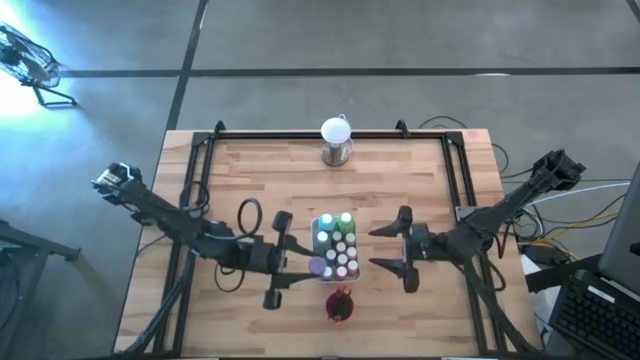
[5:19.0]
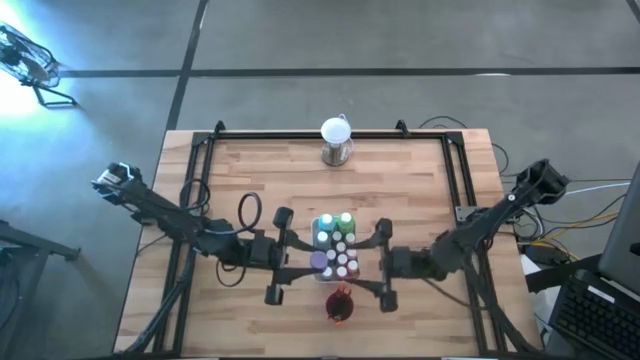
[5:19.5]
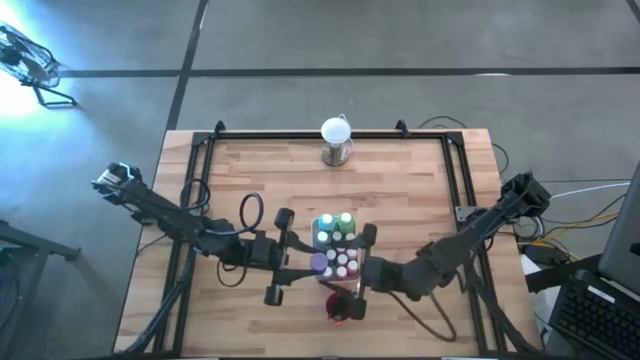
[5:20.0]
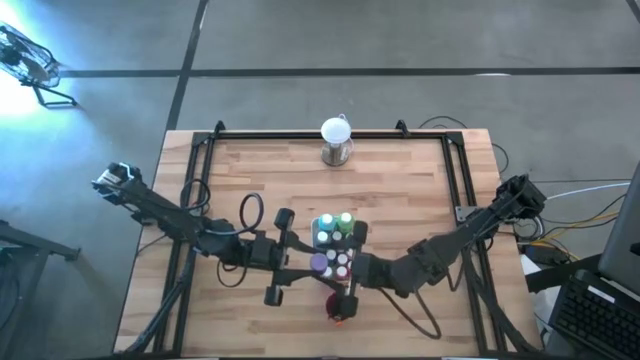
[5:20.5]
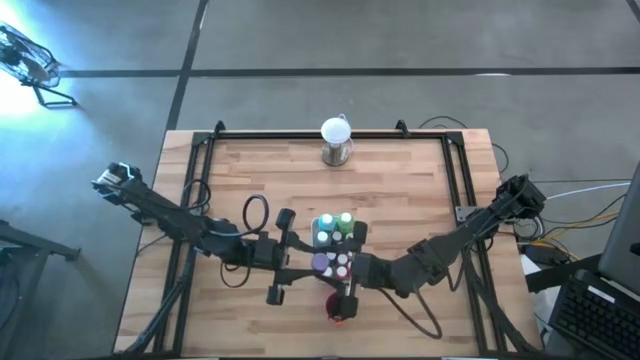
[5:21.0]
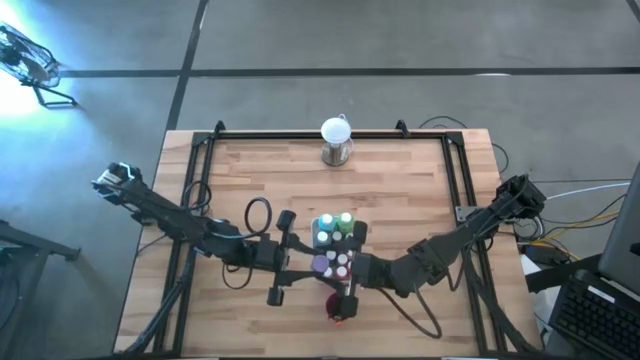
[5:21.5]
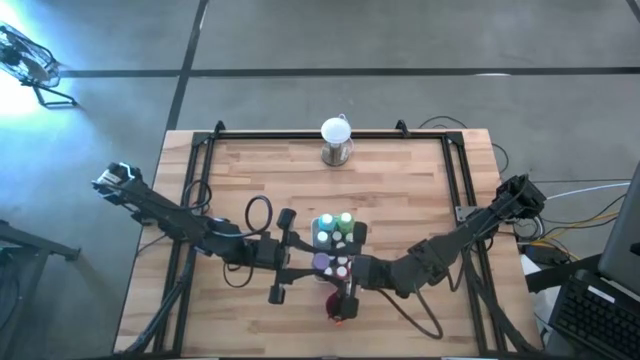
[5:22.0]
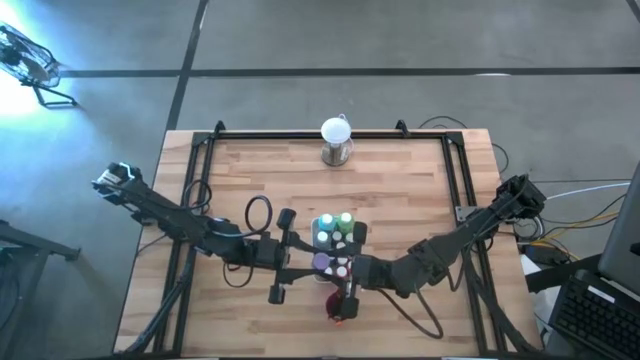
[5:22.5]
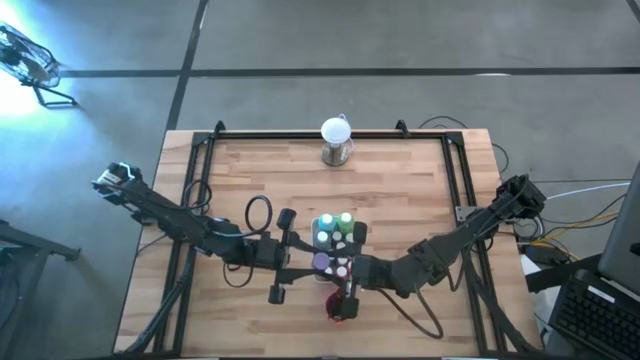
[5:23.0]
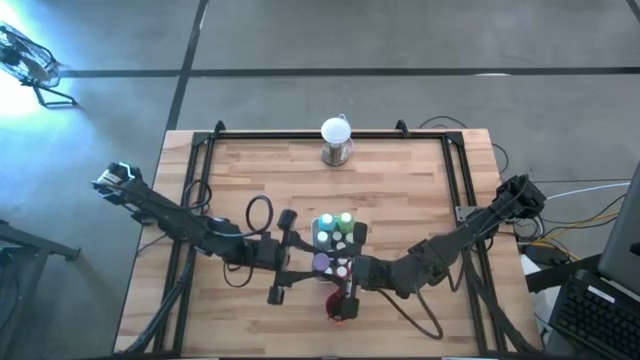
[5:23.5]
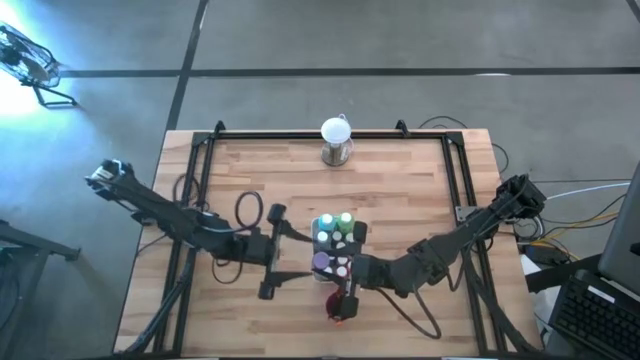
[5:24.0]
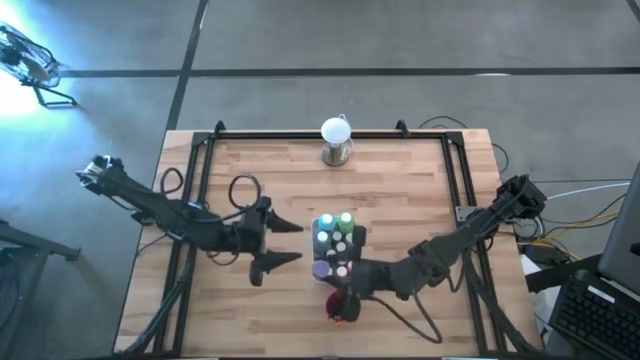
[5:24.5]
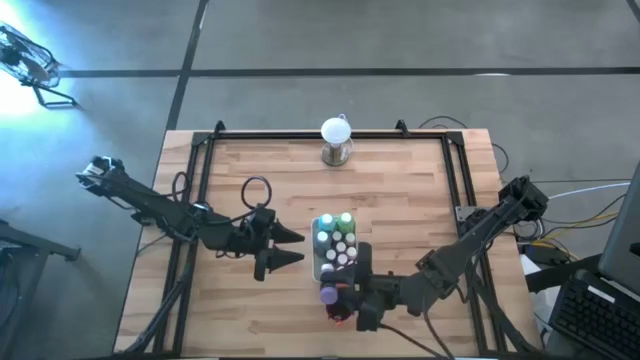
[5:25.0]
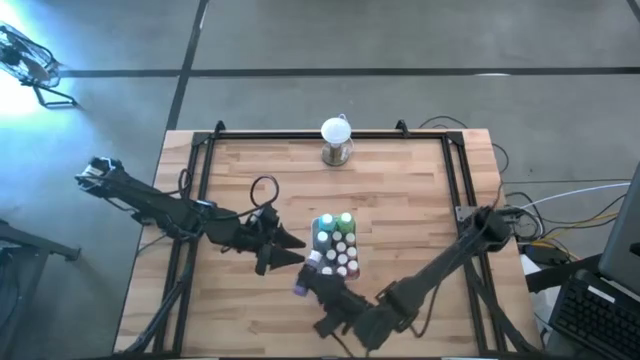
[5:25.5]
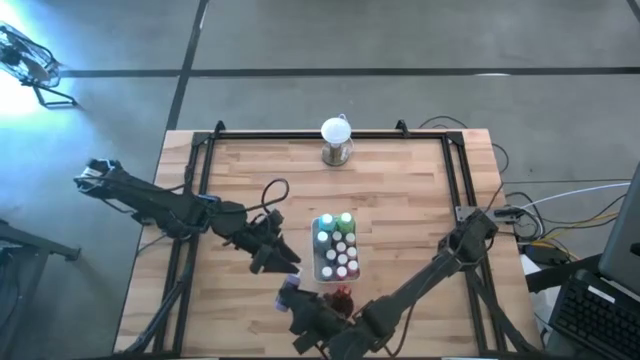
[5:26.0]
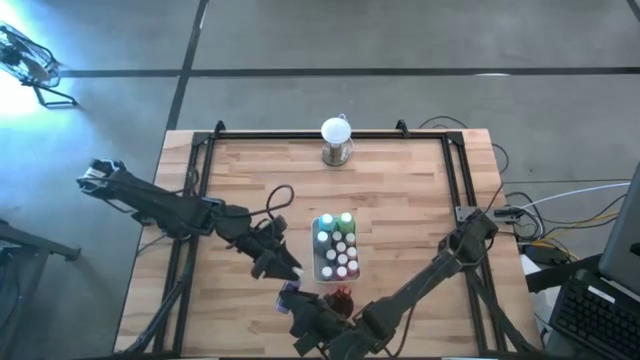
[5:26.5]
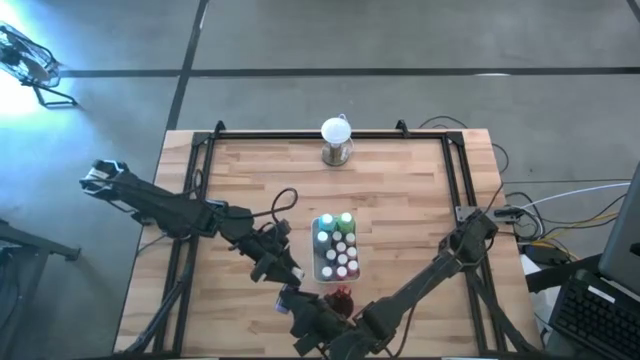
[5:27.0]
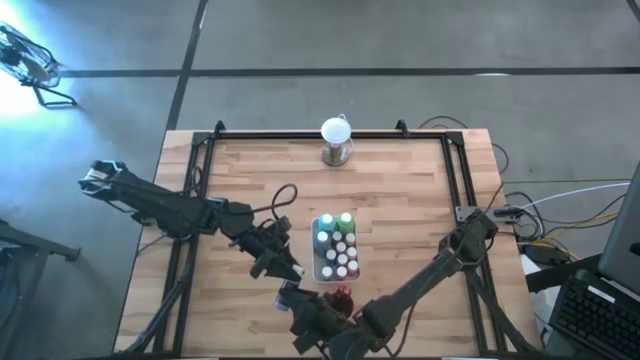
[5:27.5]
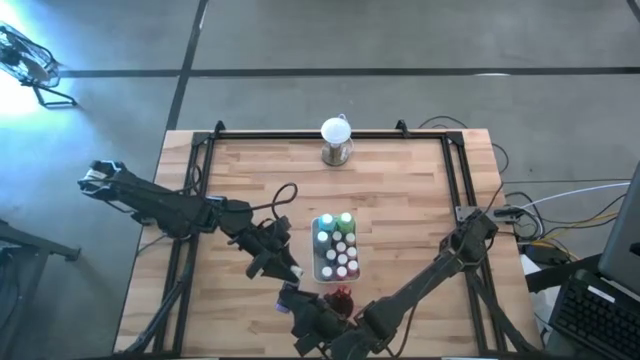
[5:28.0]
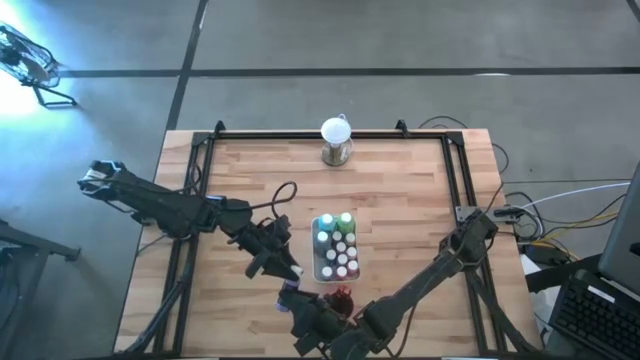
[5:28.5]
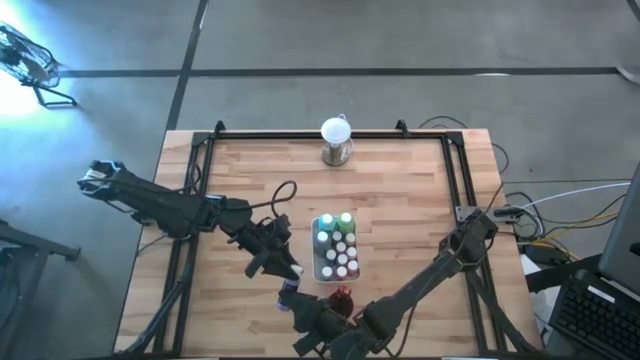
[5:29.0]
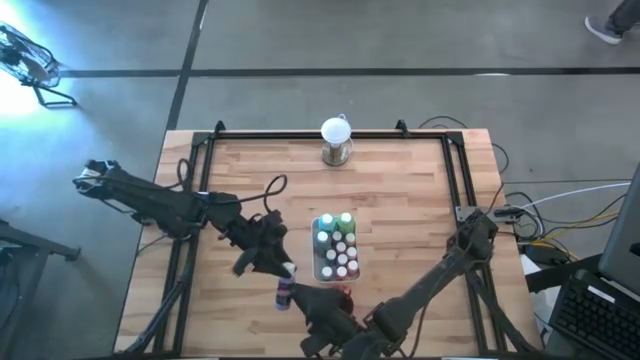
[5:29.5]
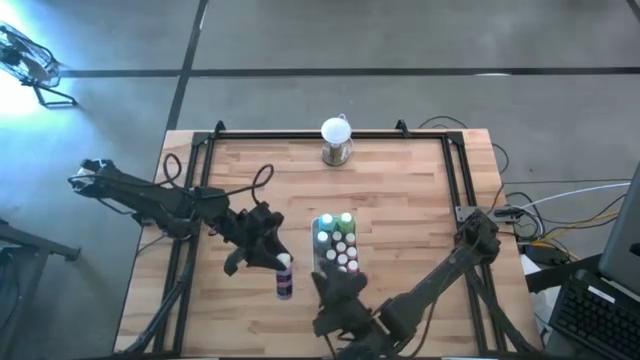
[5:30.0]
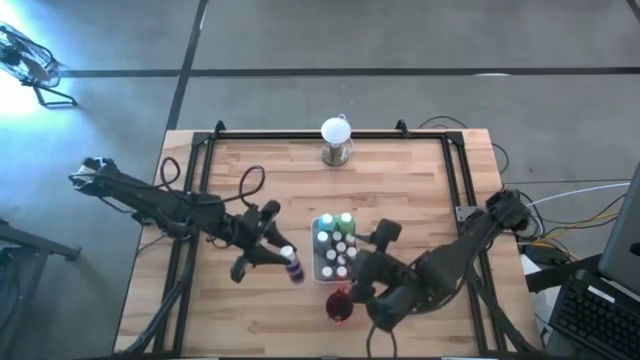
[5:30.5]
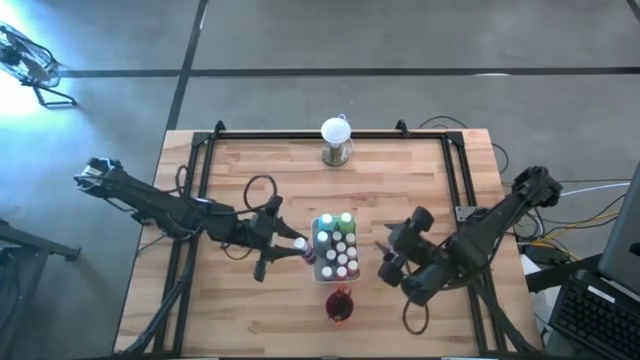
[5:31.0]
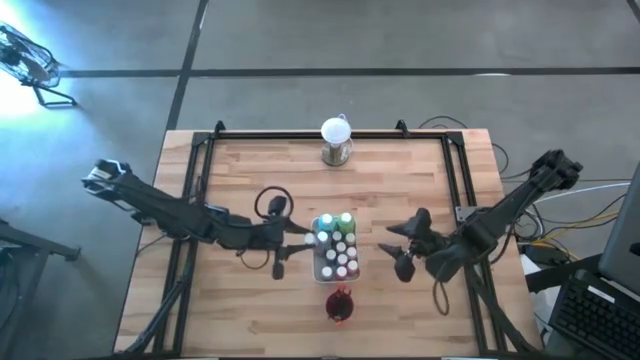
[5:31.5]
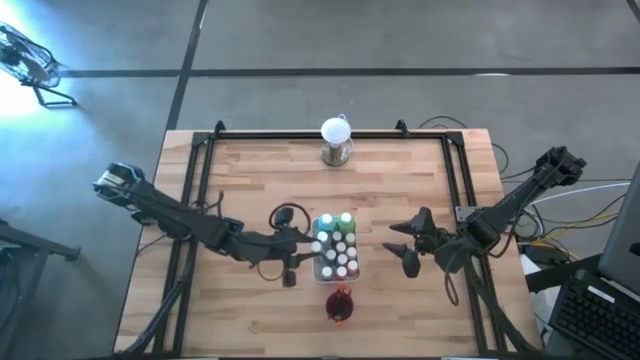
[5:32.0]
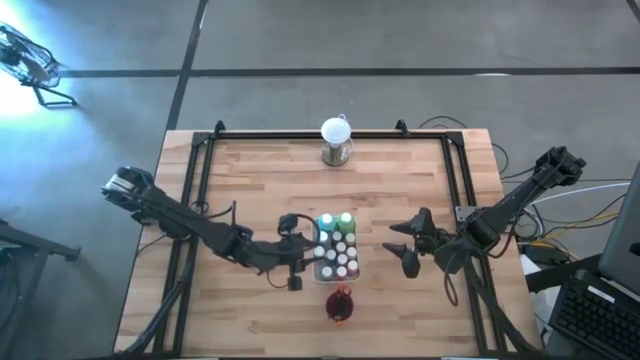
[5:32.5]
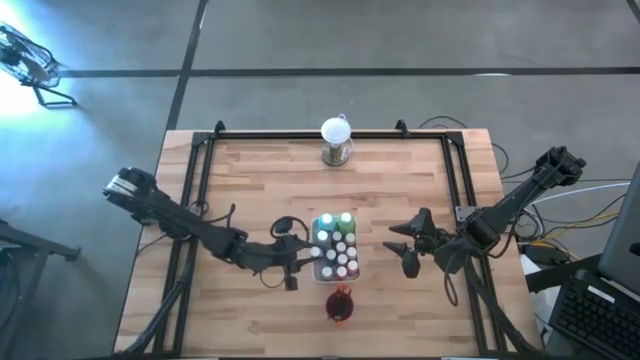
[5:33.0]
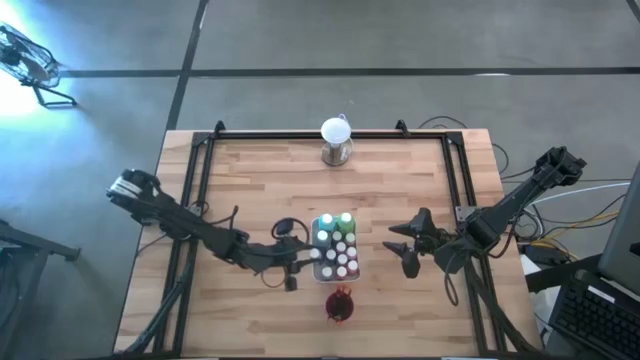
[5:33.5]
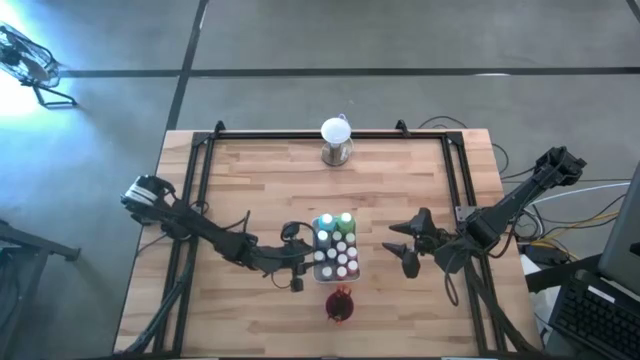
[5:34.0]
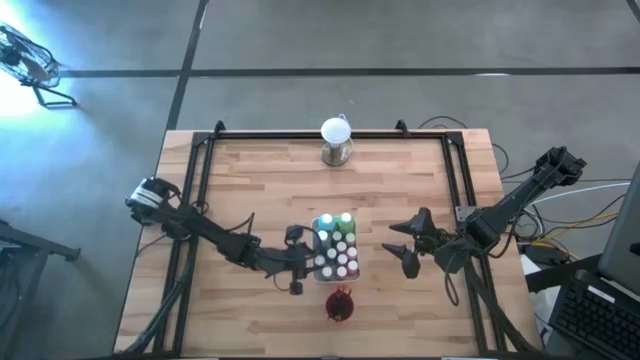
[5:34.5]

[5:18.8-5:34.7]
Task: Pick & Place Paint Supplies
Put the purple paint bottle into the white bin

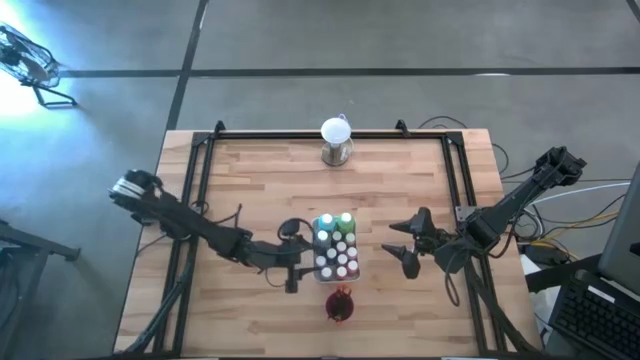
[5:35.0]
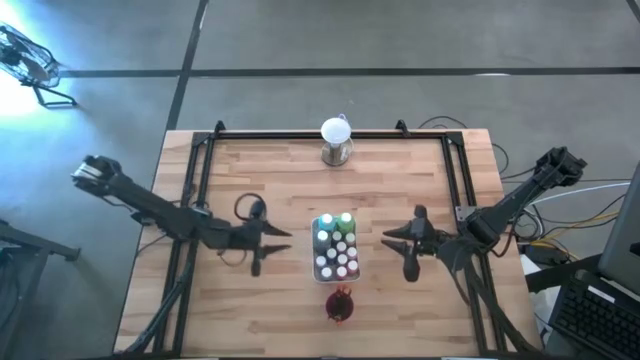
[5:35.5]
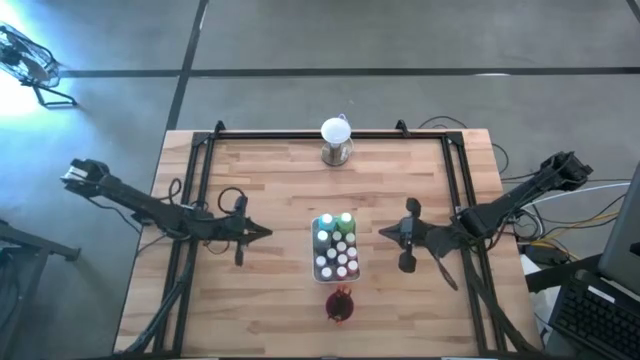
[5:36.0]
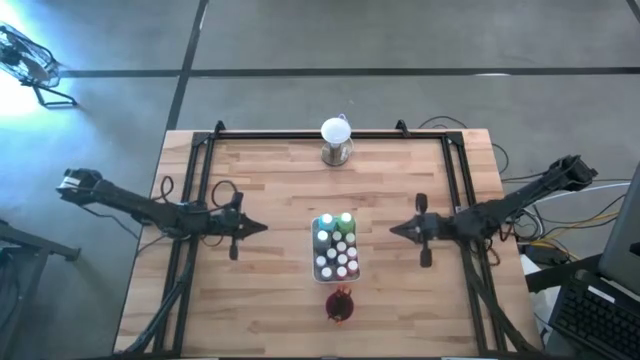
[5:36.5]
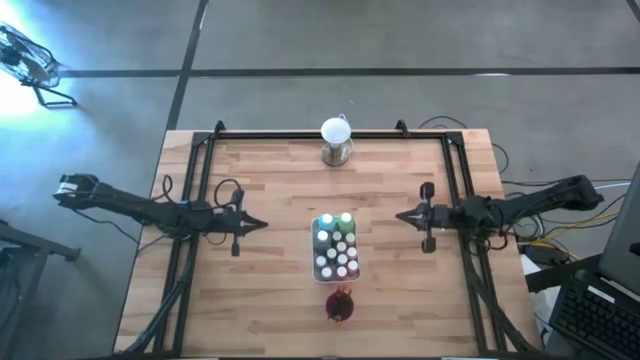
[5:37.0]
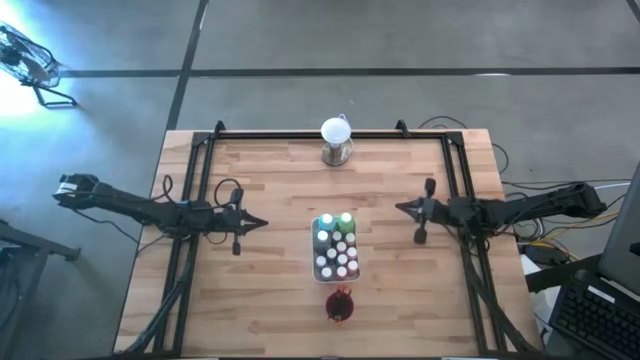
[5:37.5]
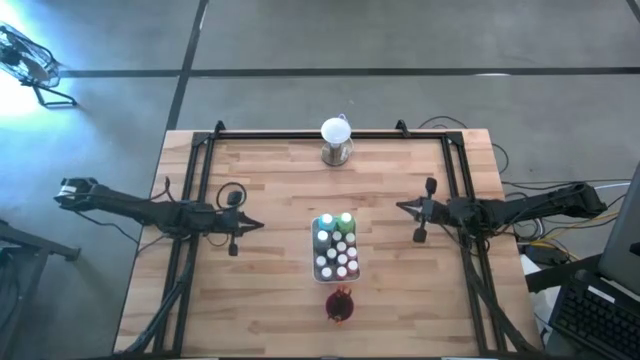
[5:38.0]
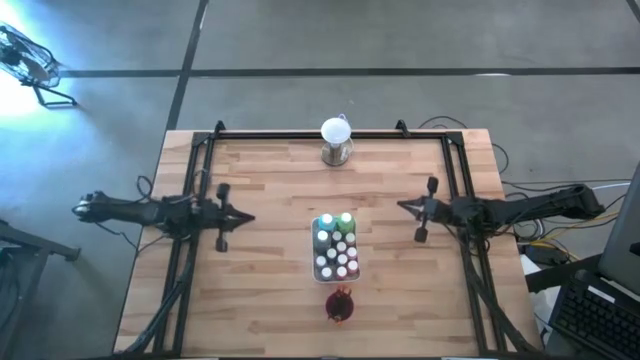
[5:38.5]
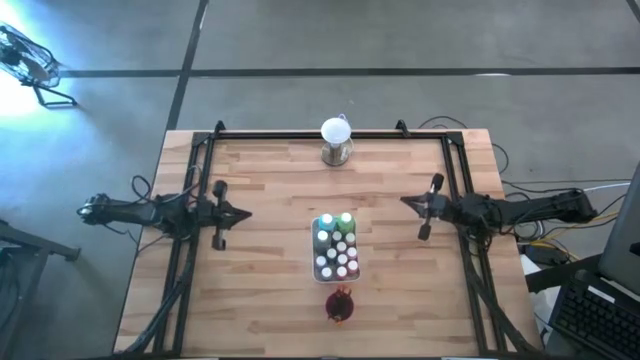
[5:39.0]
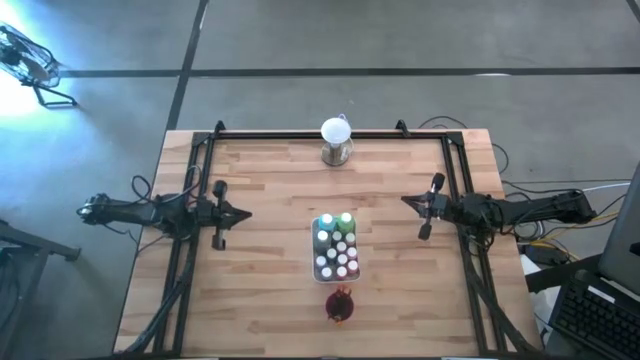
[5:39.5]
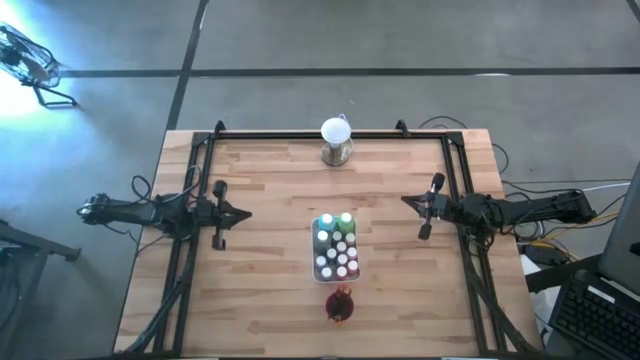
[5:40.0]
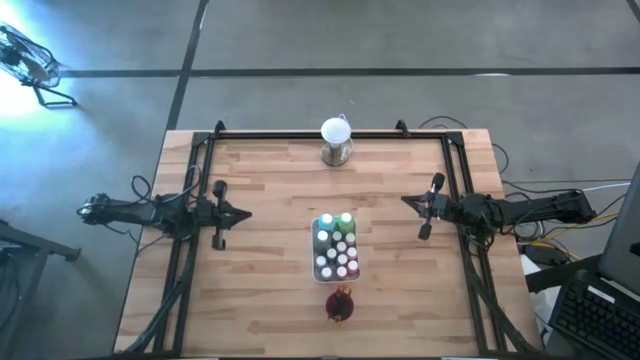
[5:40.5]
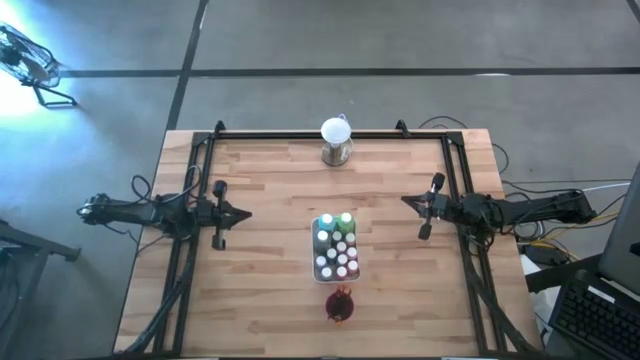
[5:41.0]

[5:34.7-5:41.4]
Return to Home Position
